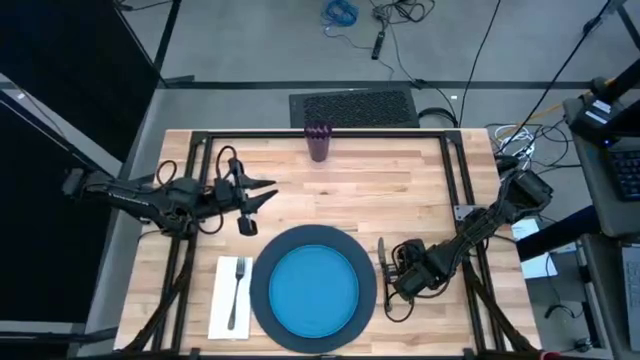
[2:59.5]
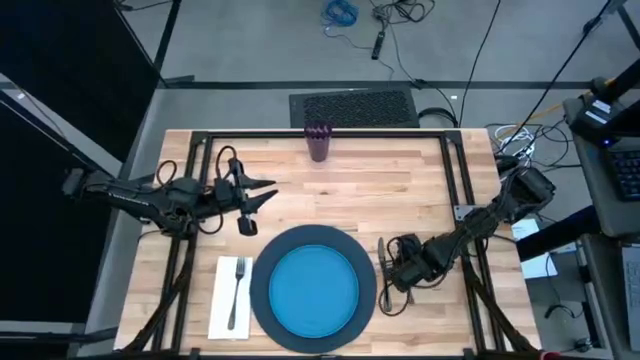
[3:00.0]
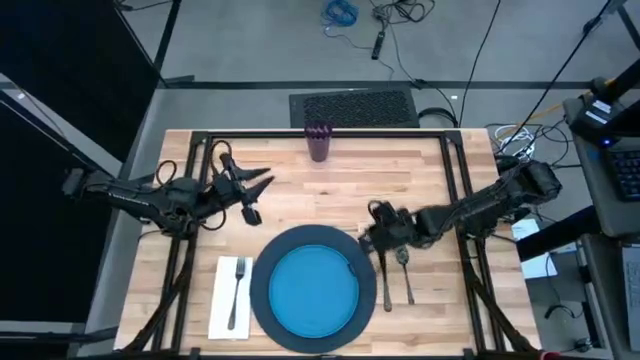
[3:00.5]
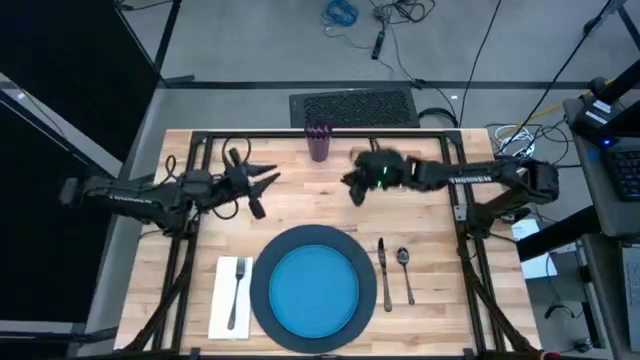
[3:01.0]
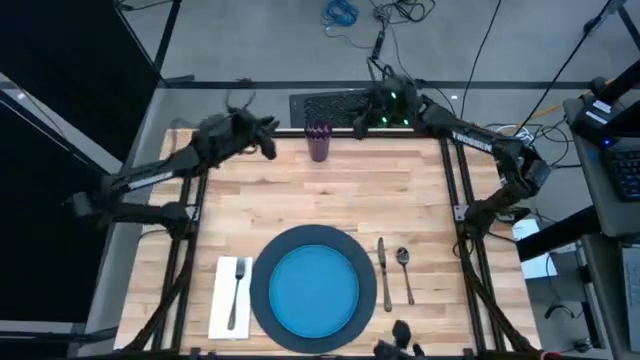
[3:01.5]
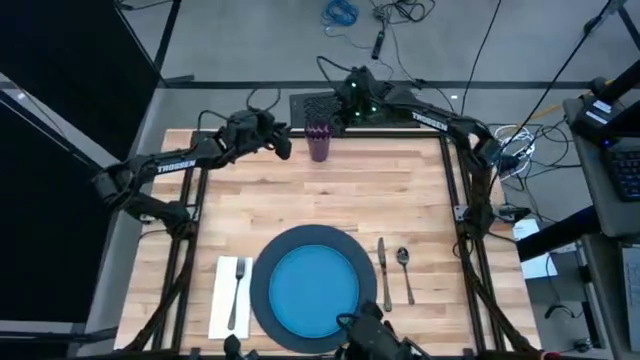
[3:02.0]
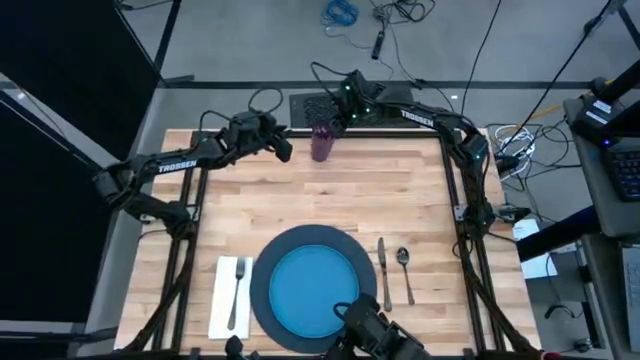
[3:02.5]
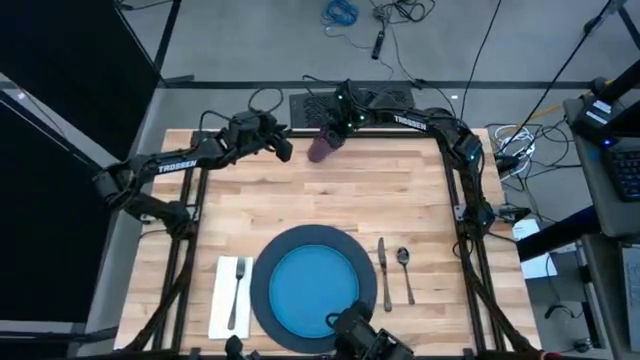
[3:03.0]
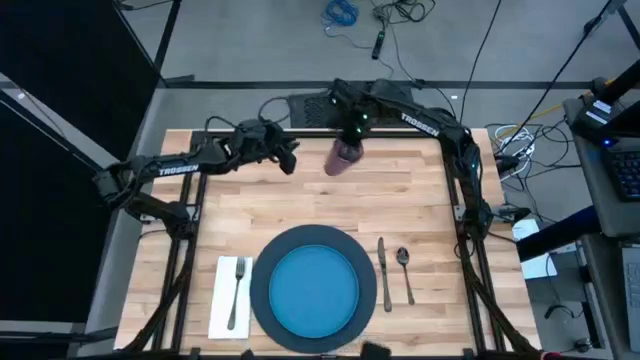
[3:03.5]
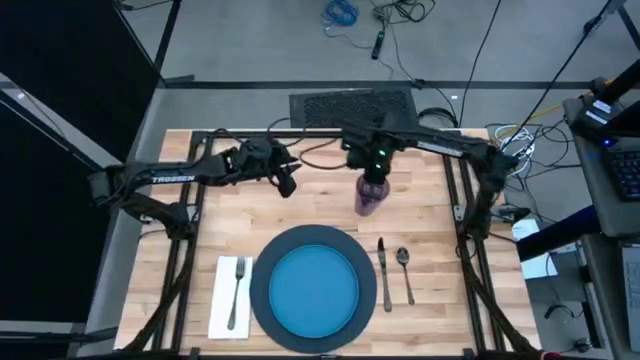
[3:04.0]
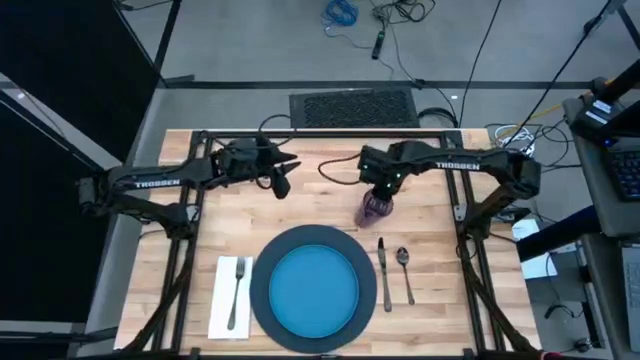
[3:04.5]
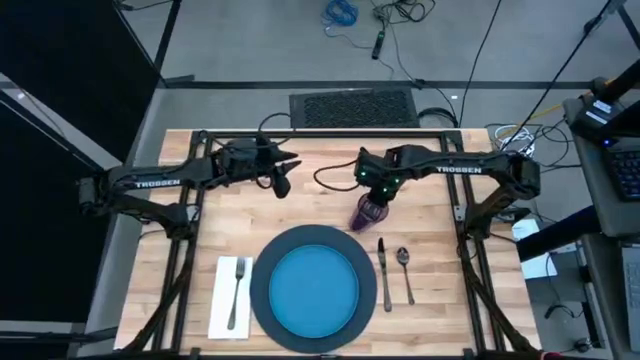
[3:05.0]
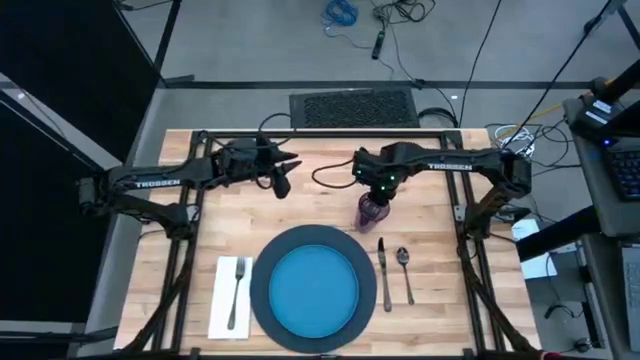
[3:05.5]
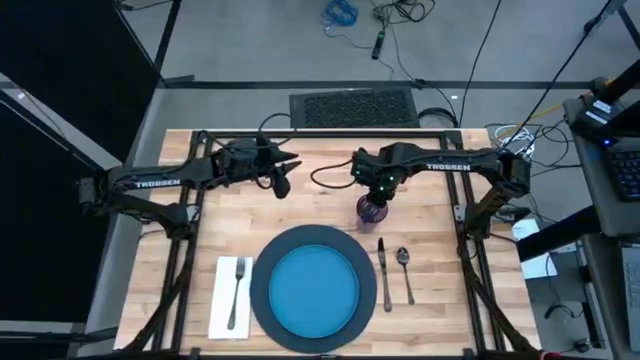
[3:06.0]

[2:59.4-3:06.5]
Task: Set table place
Put the violet cup to the top of the dark blue tablemat

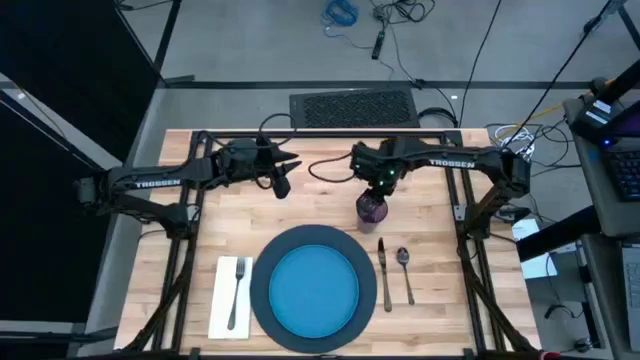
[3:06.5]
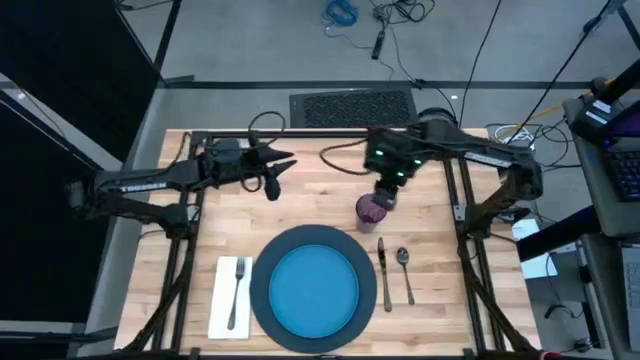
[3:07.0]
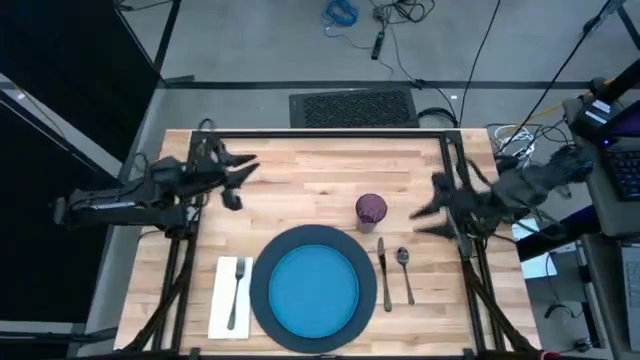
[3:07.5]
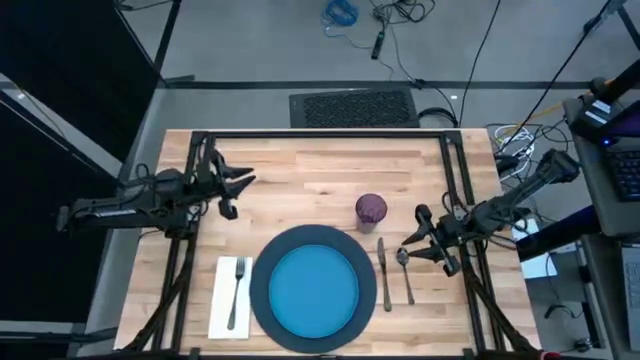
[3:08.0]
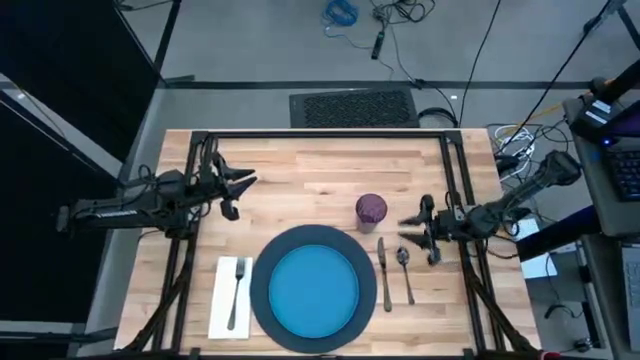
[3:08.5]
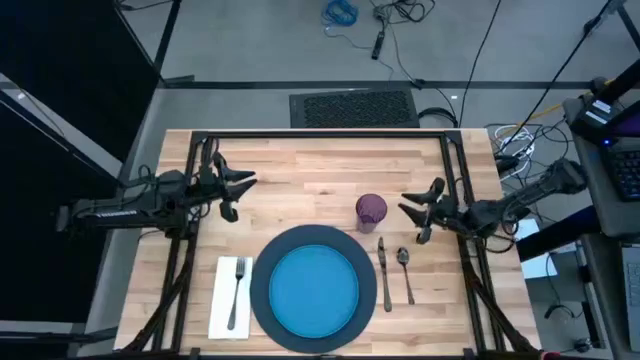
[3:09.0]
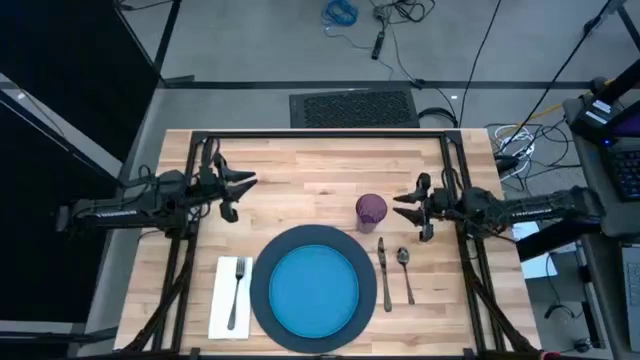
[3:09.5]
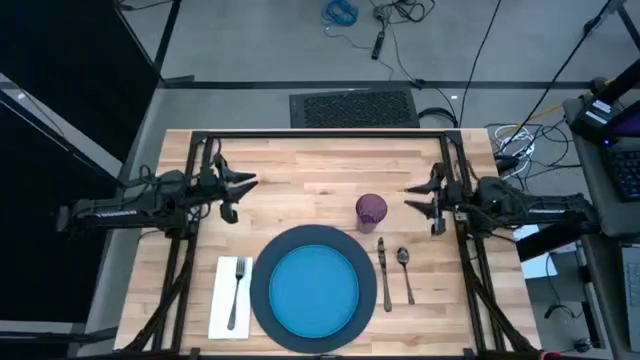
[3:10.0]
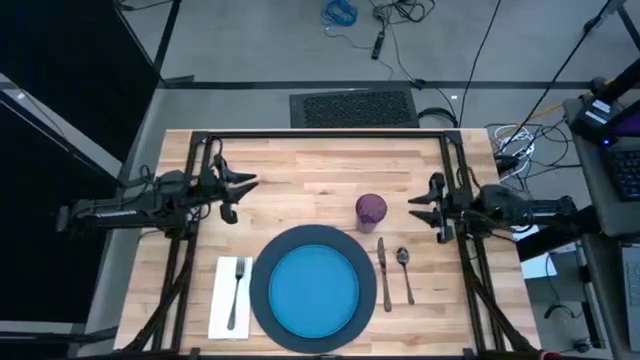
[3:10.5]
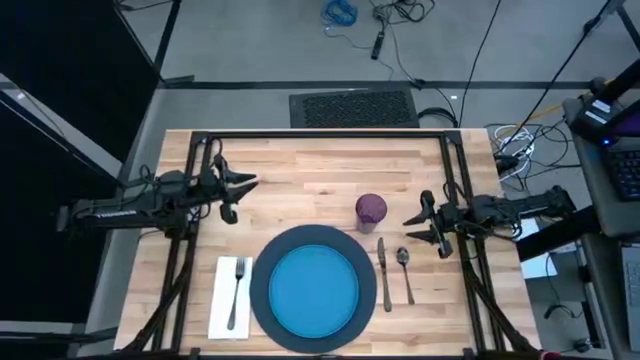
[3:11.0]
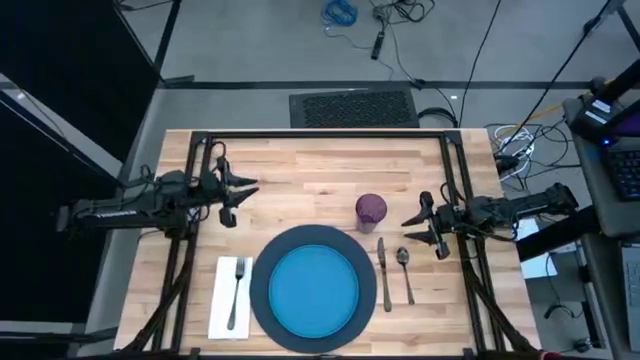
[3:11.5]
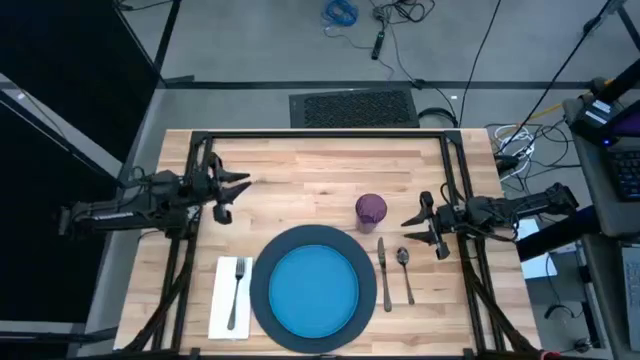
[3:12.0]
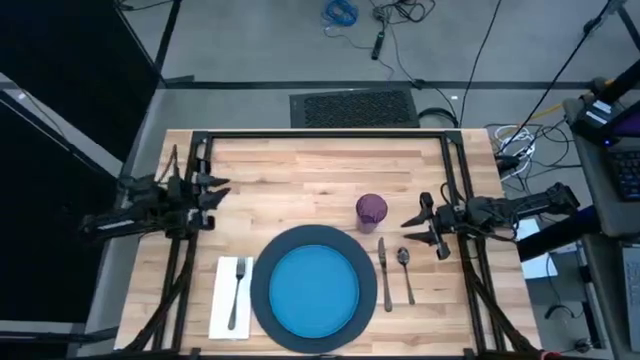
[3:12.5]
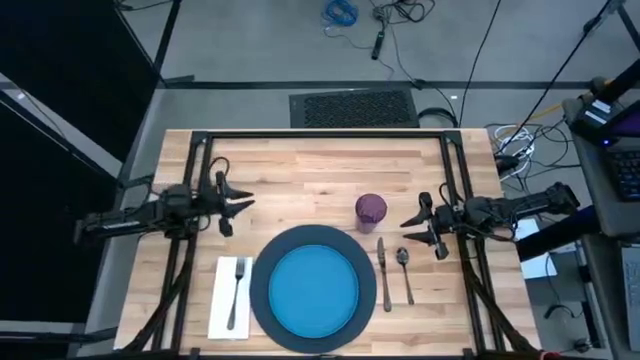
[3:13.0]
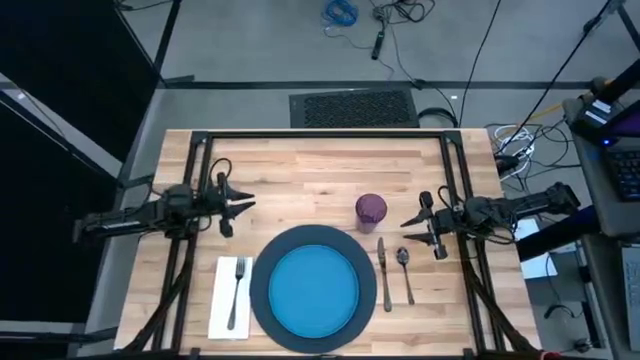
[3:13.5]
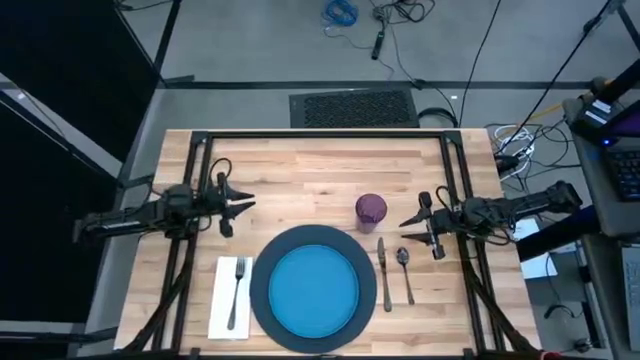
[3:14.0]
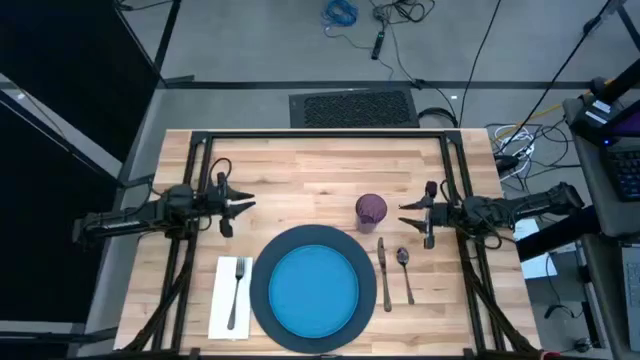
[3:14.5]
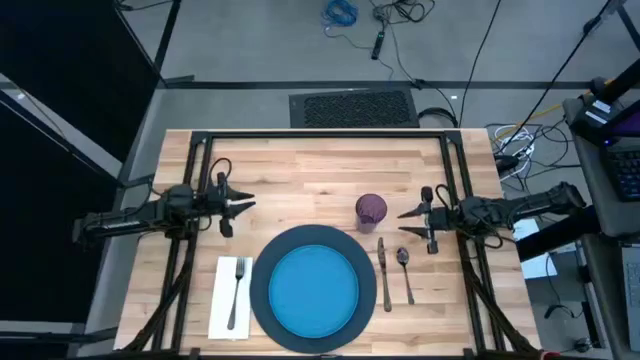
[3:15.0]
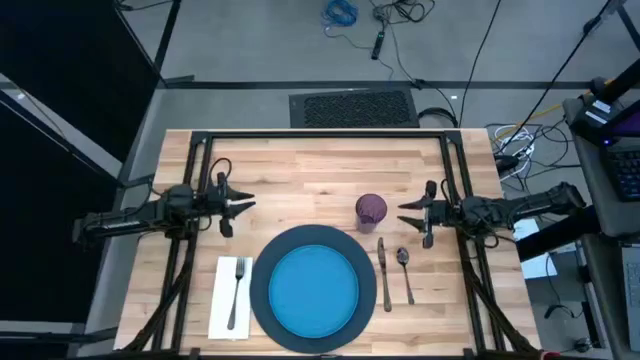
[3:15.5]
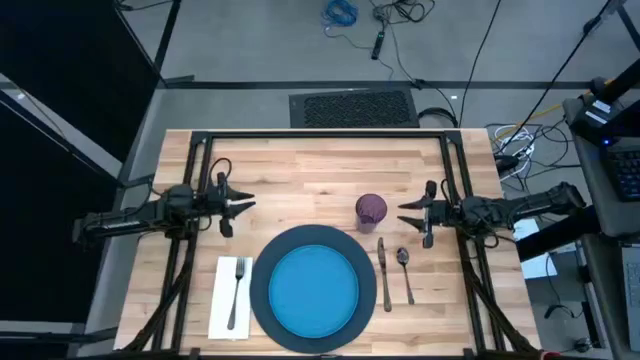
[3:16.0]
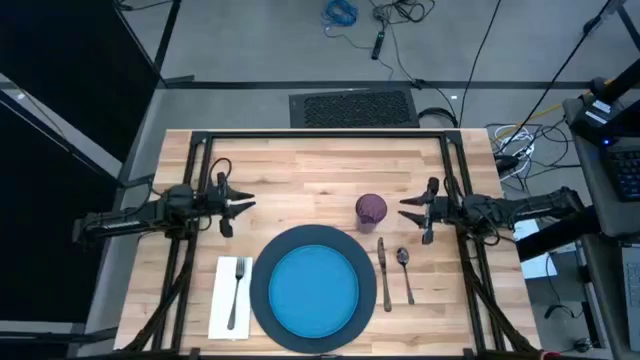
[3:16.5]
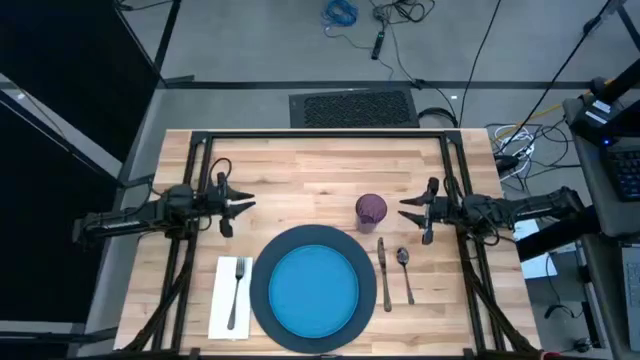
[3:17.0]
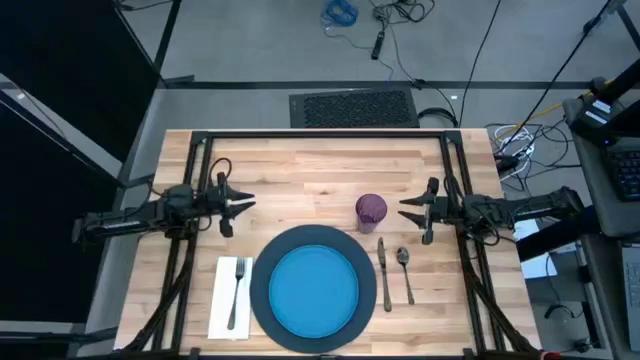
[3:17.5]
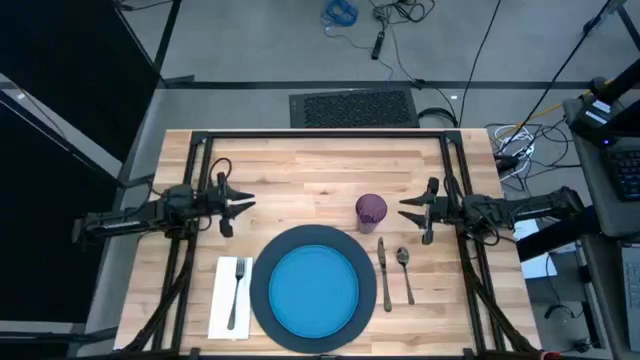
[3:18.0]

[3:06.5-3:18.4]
Return to Home Position

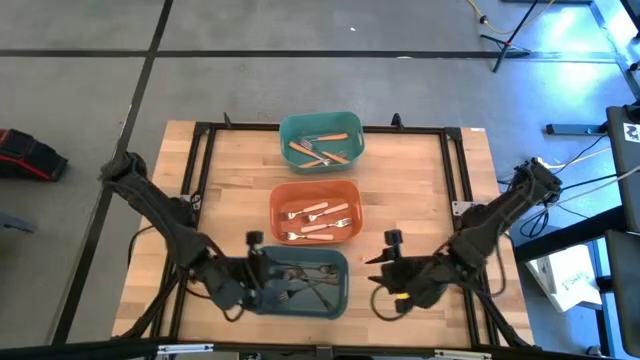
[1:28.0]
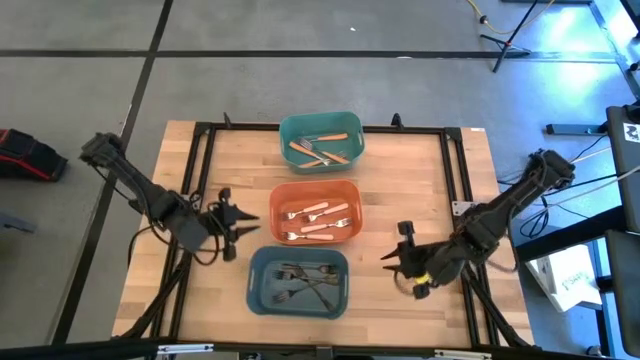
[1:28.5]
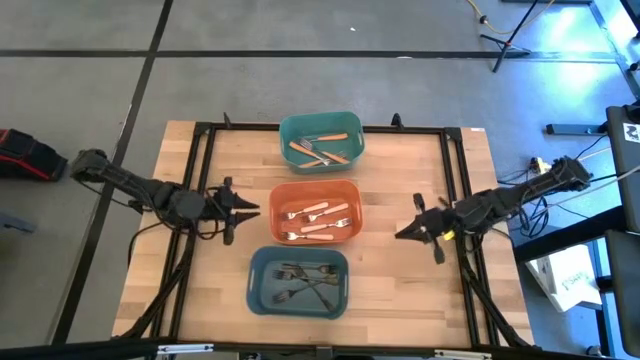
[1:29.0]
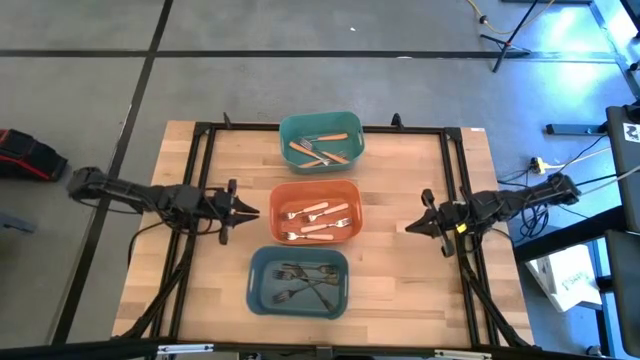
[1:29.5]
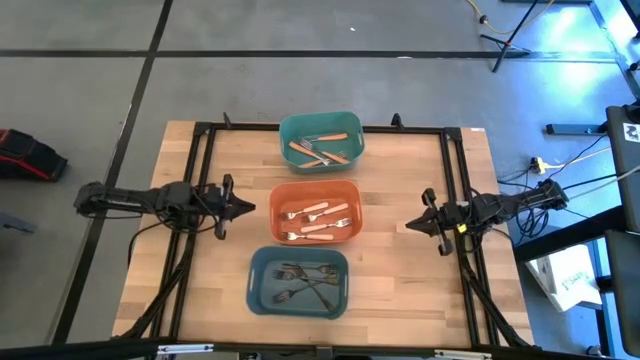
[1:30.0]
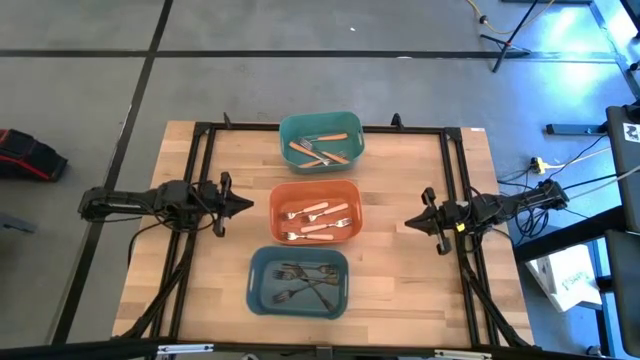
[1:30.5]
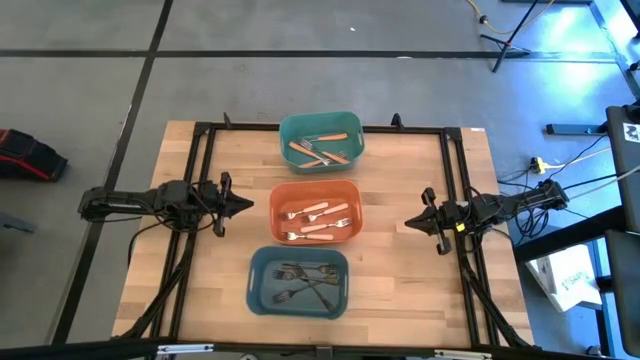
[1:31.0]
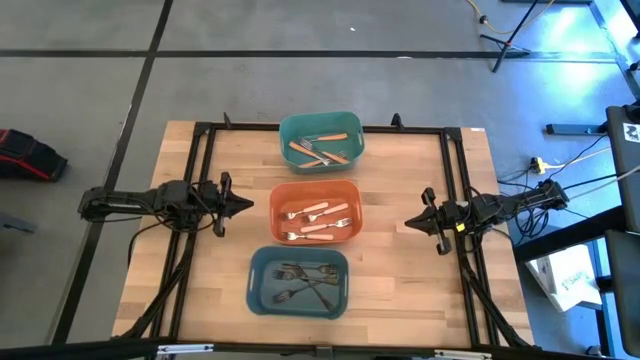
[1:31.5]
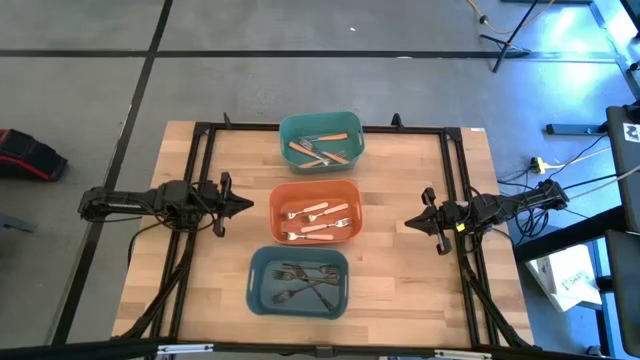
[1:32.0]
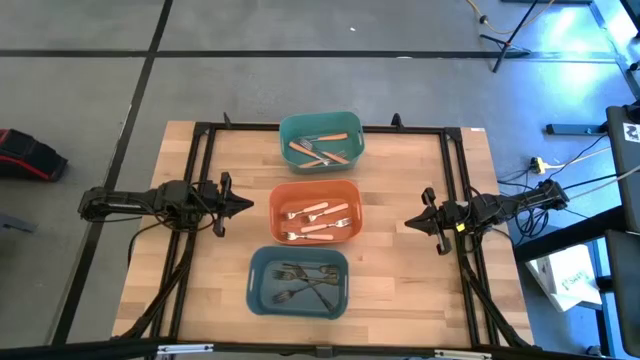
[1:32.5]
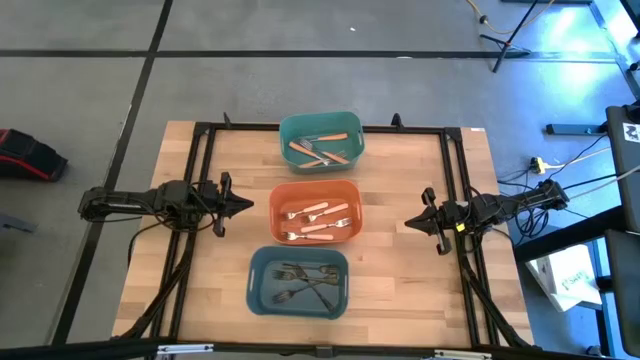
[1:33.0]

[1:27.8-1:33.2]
Task: Sort silverware by color (type)
Return to Home Position
